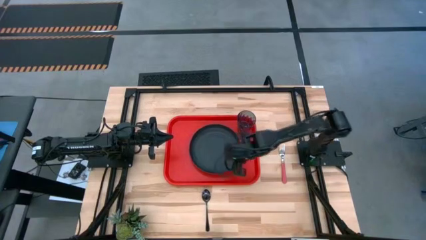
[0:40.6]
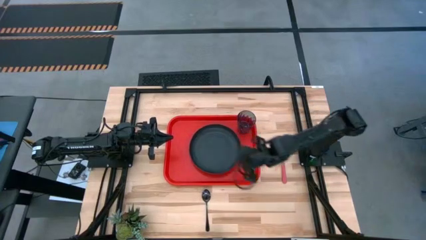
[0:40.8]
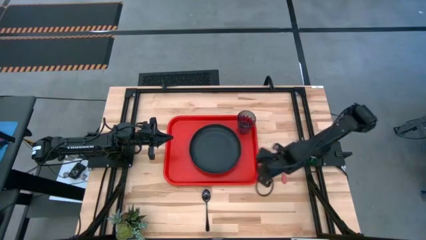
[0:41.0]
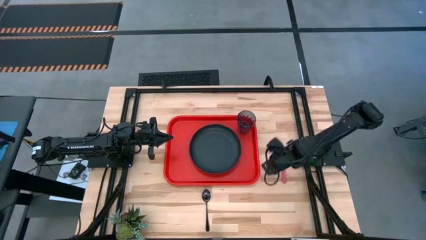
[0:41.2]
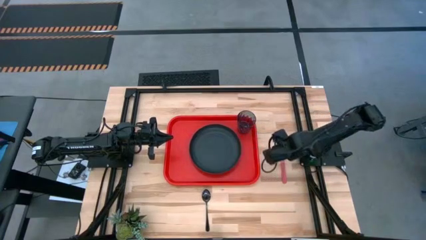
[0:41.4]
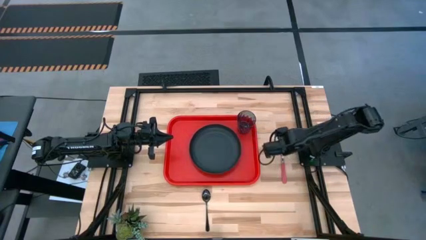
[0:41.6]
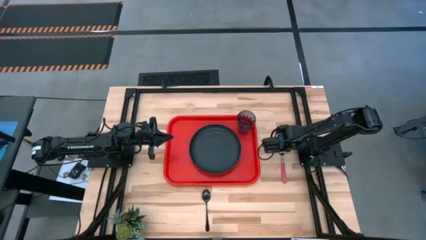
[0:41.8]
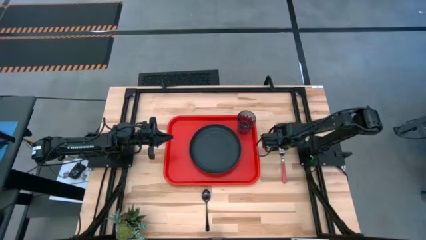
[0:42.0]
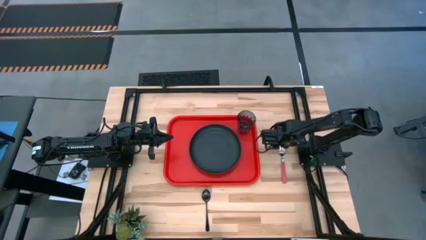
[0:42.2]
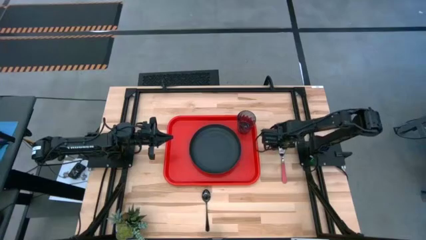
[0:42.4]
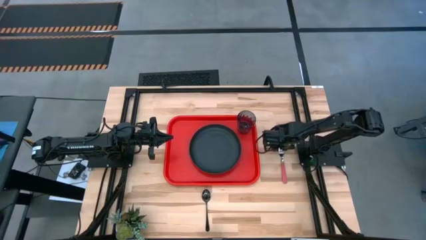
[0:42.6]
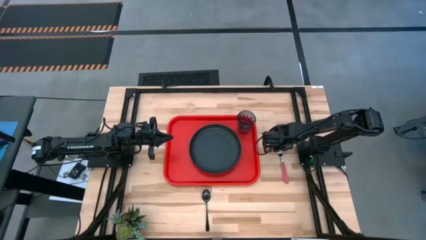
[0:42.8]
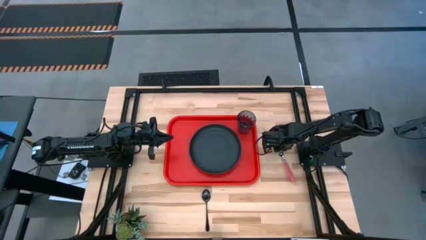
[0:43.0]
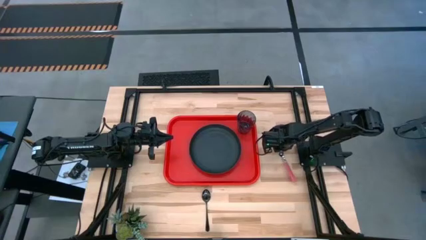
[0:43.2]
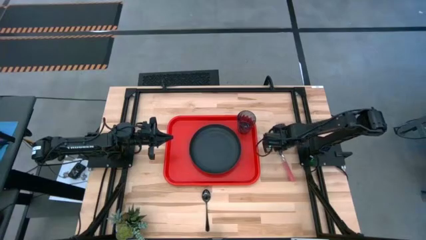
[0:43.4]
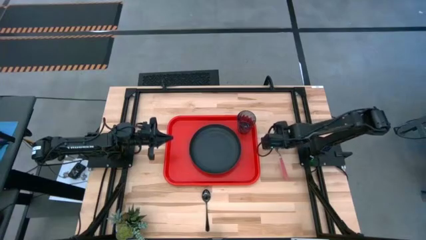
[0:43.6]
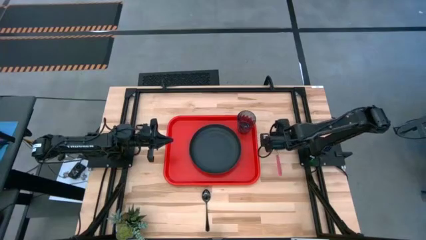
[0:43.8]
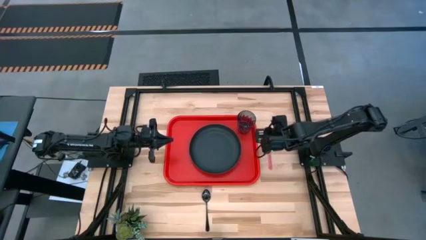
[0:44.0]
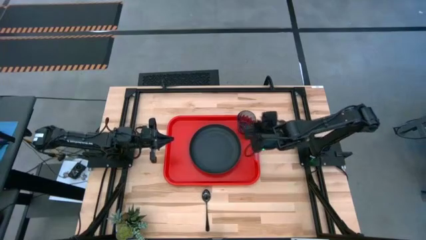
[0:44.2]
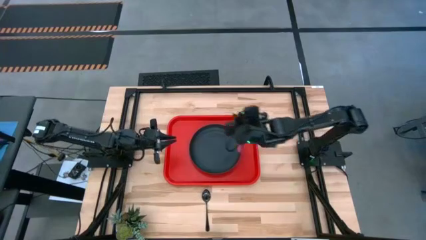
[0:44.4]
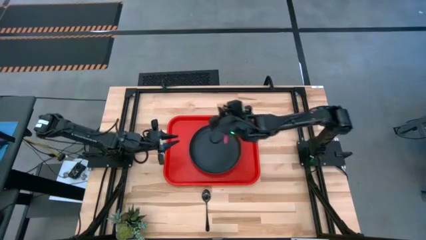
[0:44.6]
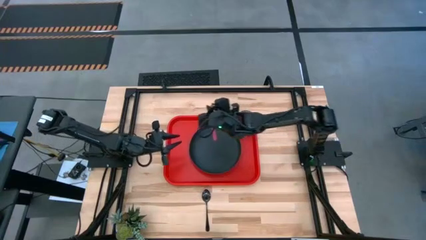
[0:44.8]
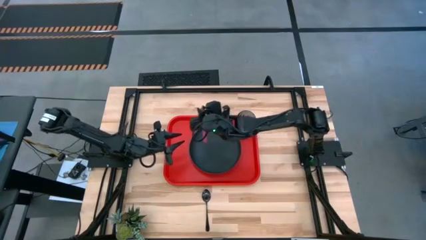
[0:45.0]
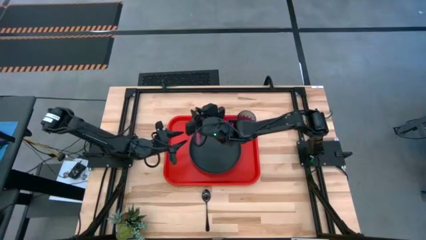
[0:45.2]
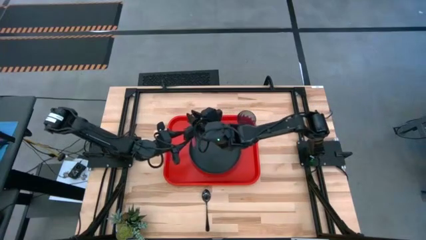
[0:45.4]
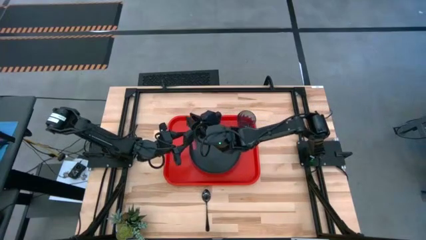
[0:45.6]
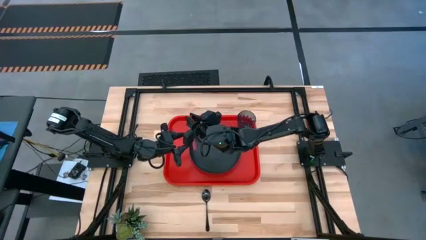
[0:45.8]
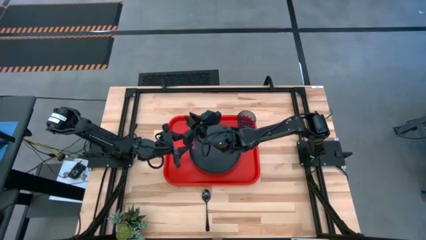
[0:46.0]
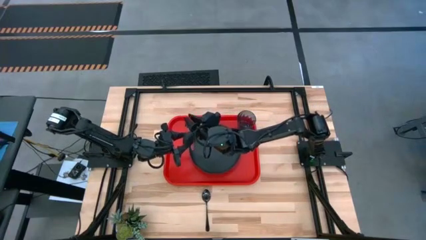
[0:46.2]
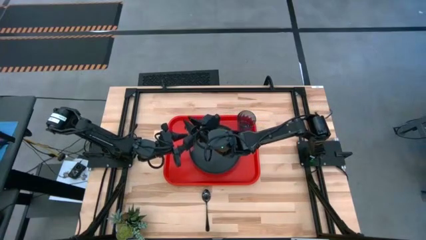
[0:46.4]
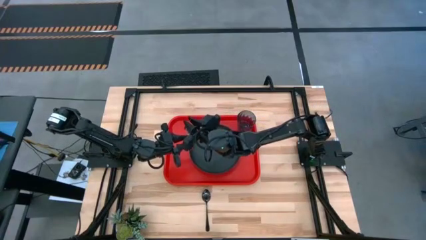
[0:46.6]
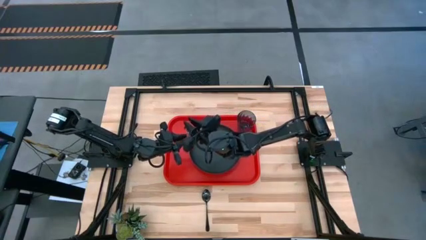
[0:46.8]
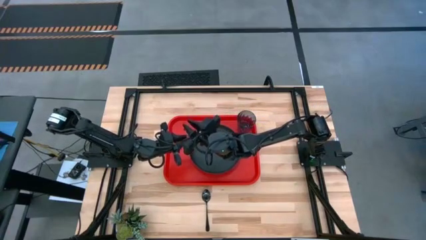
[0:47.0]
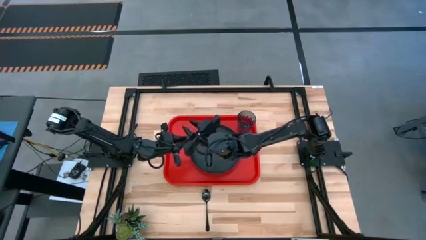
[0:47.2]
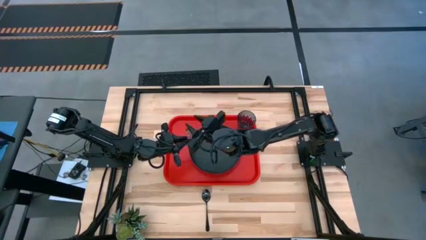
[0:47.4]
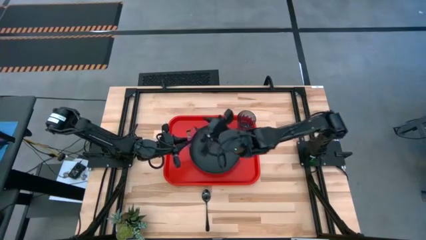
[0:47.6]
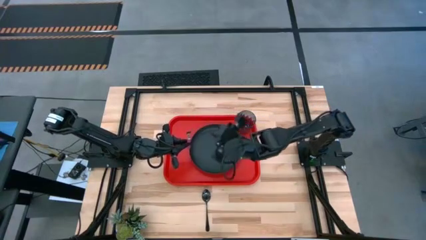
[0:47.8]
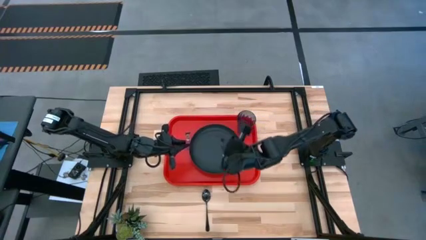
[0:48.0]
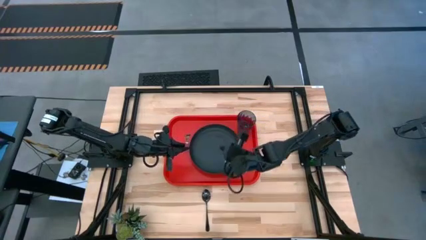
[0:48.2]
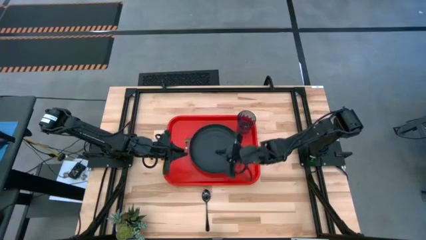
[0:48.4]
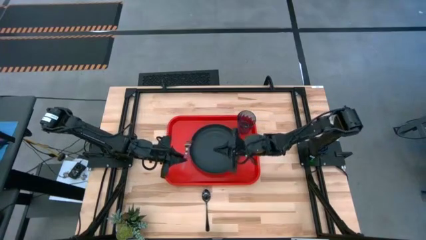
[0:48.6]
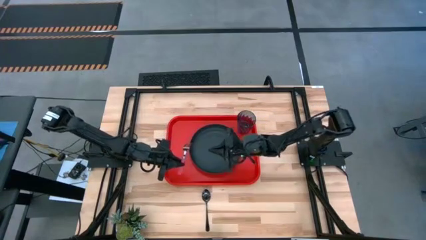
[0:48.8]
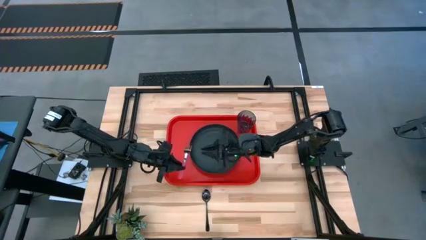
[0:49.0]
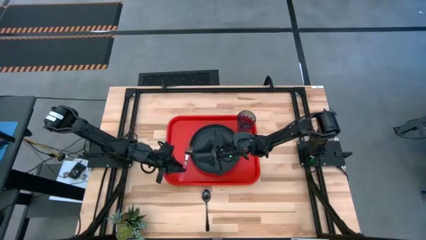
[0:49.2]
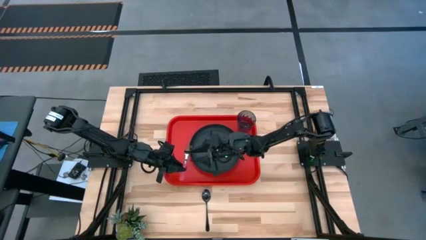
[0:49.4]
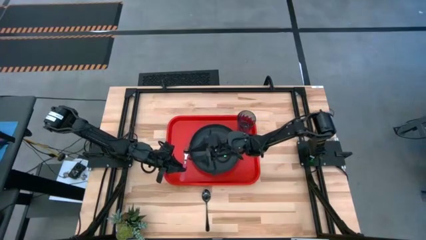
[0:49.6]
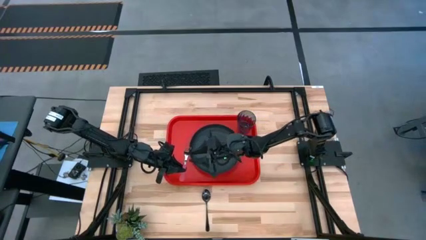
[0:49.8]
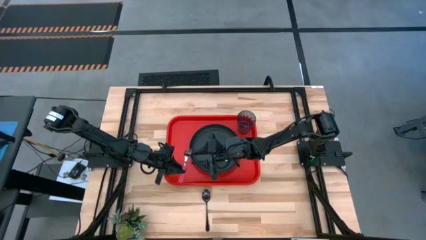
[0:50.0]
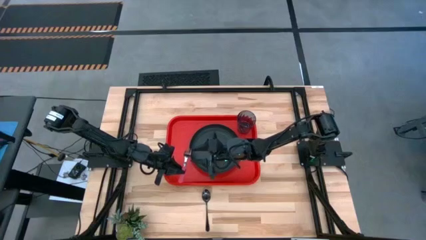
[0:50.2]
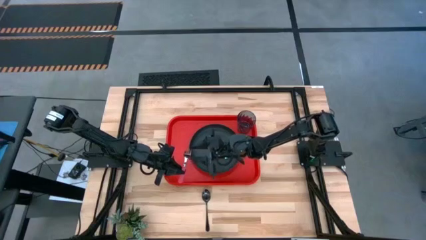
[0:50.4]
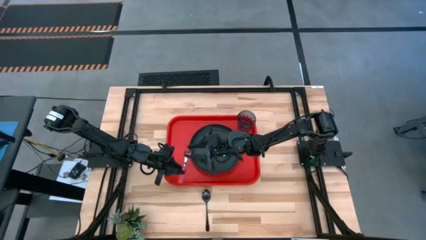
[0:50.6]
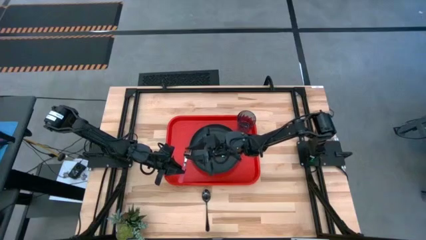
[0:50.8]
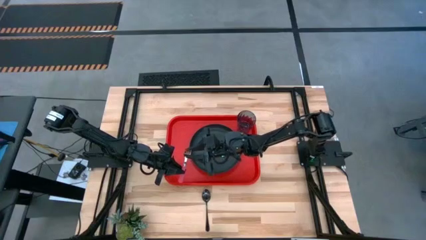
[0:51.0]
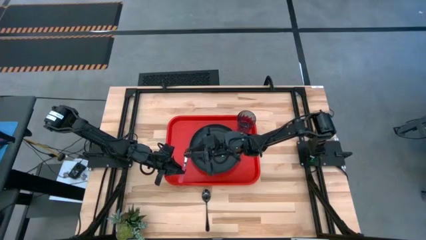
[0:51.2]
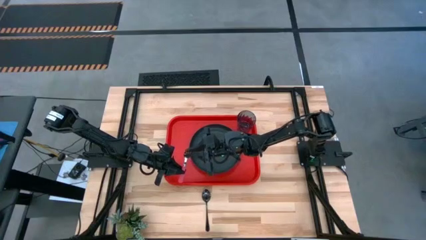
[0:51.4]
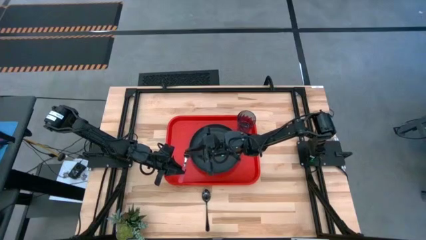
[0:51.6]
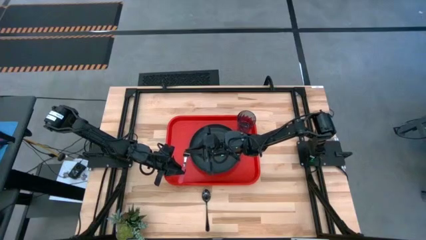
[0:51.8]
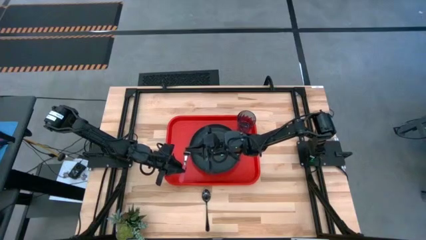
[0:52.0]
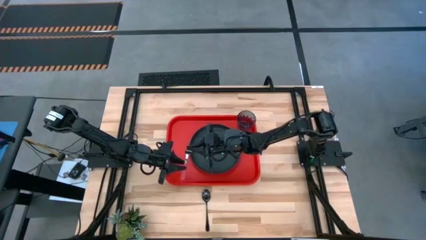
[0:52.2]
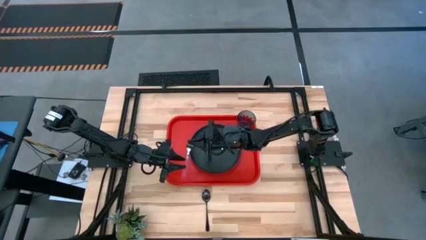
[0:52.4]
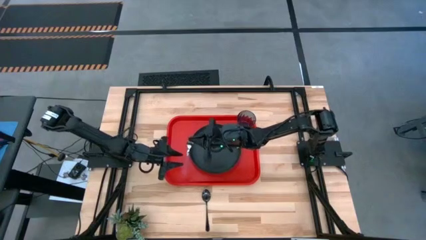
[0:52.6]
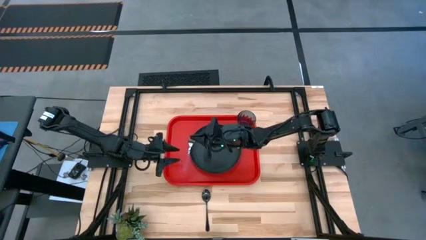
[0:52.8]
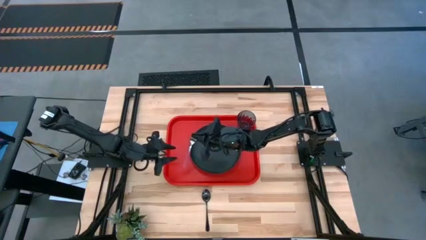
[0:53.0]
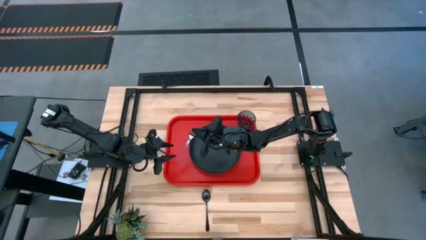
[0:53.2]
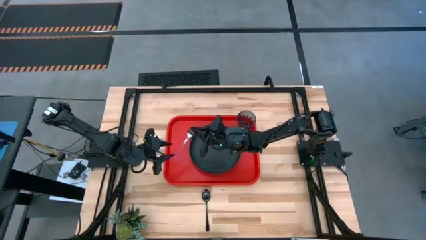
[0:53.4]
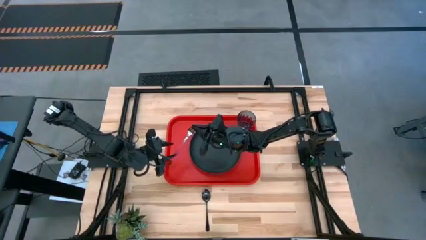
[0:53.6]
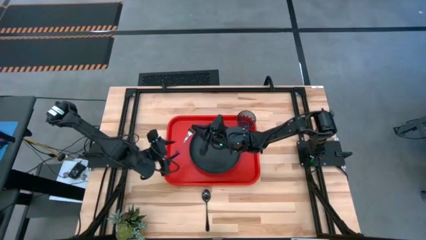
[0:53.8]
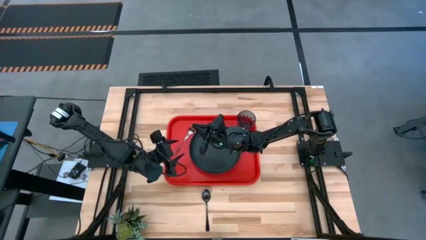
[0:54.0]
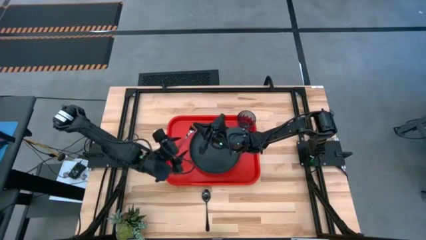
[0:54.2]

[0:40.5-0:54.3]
Task: Pick and place plate/cup/fork/spoon on tray
Put the pink fork on the red serving tray to the left of the black plate

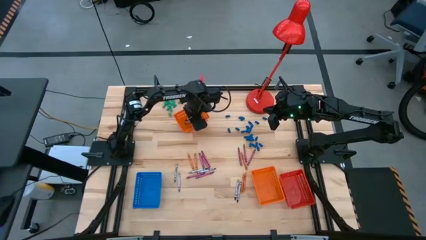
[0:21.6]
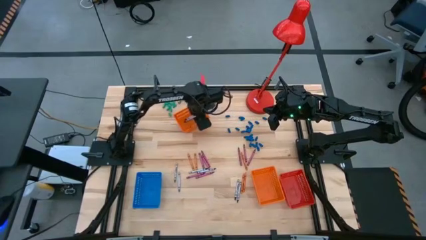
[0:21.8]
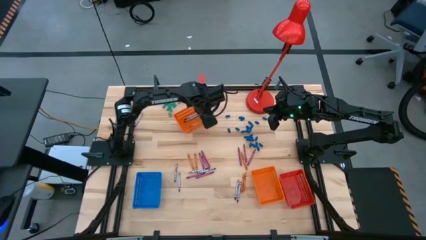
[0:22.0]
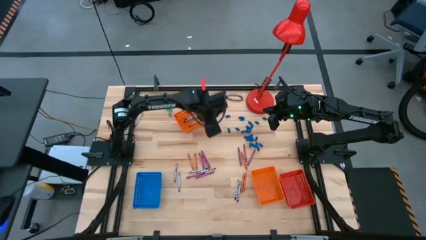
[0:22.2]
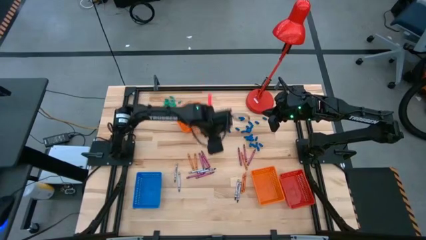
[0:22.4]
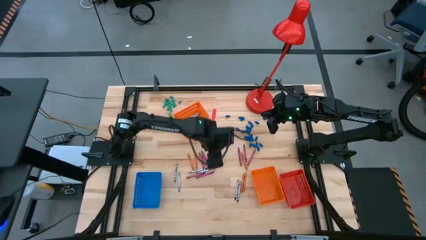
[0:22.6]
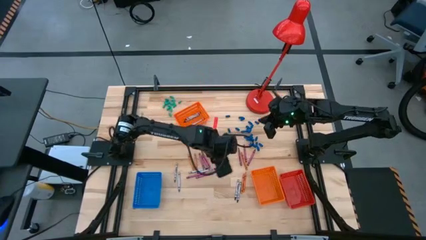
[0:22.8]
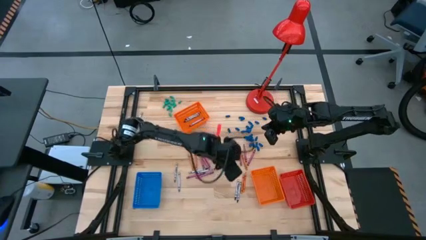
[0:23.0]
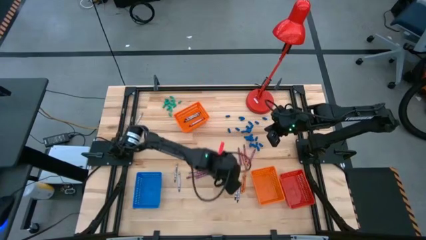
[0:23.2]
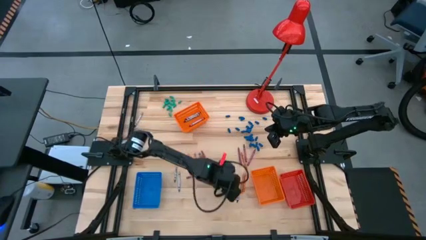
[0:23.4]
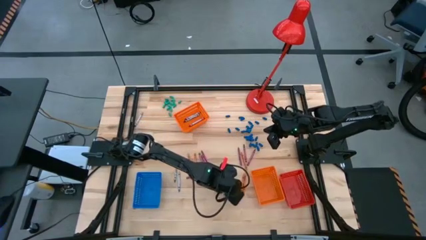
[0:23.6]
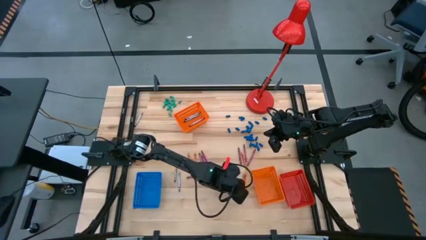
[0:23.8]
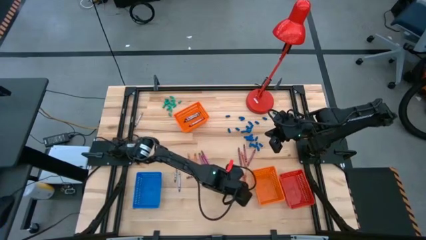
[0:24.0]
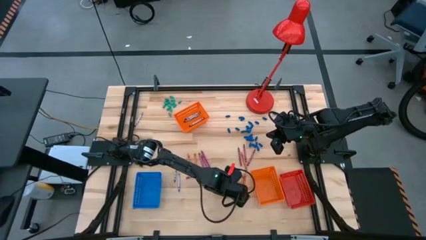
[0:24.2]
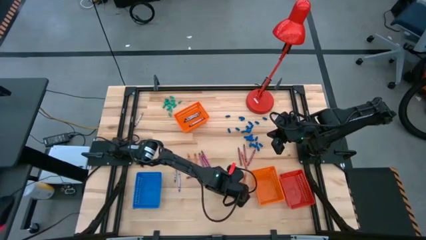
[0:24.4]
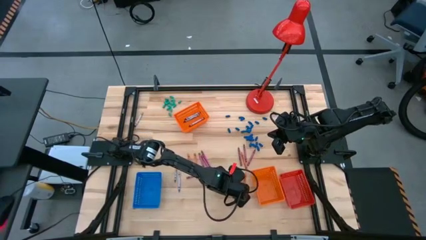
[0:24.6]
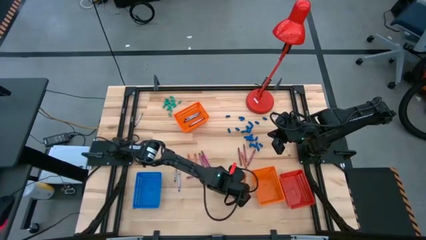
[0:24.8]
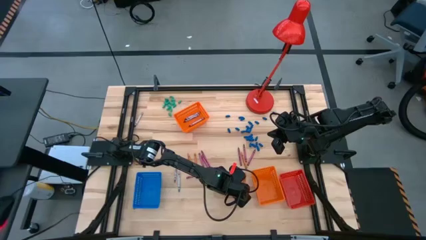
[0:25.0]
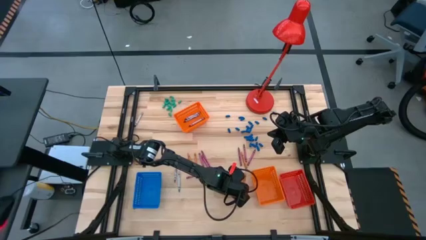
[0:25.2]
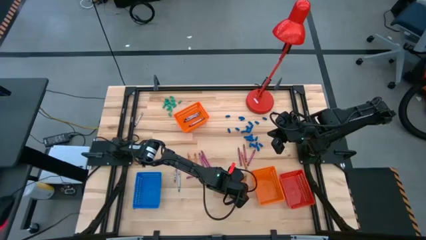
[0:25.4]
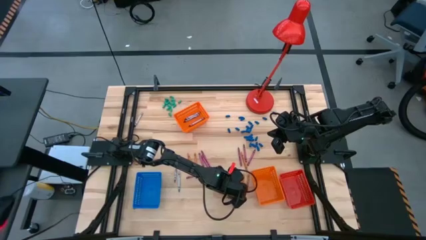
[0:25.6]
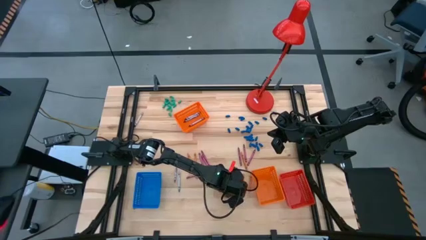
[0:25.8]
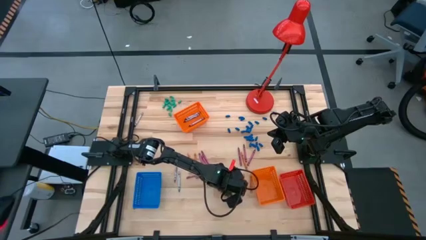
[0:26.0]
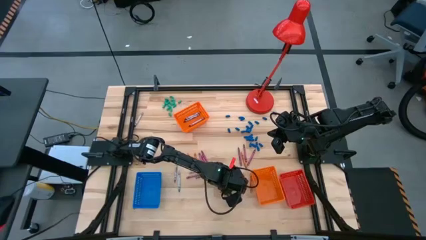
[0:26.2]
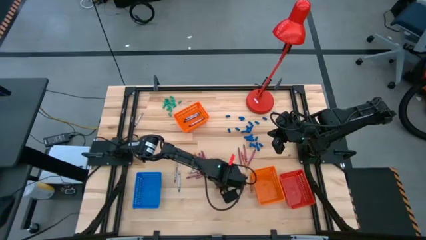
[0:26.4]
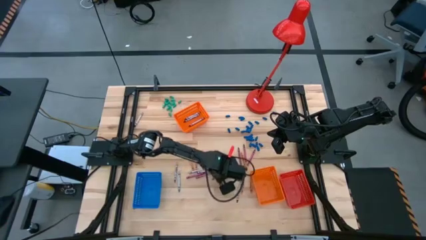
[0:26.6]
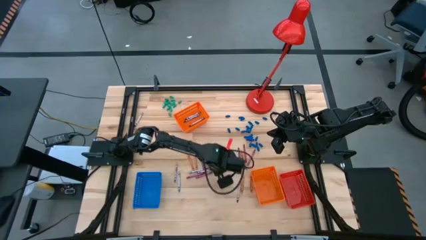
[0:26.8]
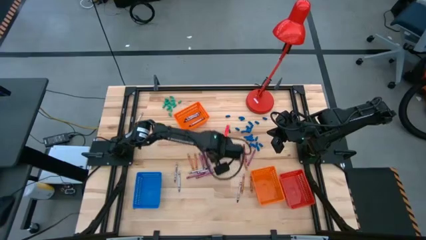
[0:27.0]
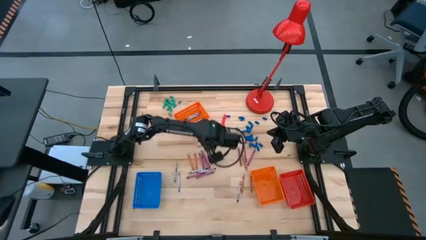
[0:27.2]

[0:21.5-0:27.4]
Task: Sort crayons
Put the black crayon into the top orange bin
